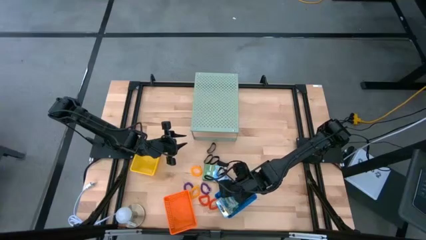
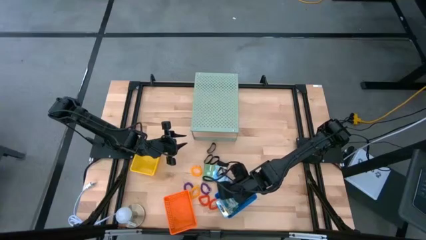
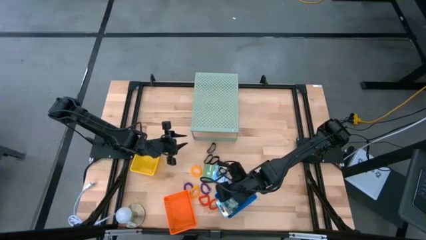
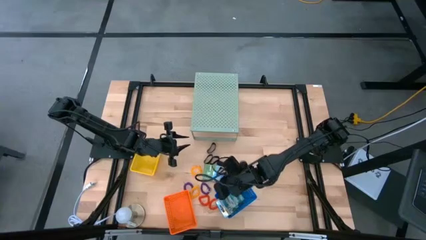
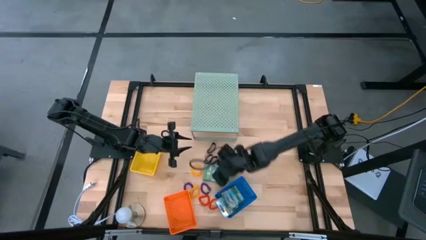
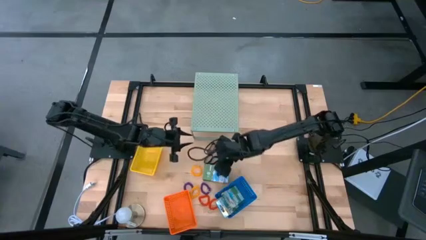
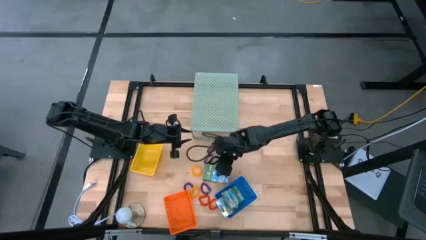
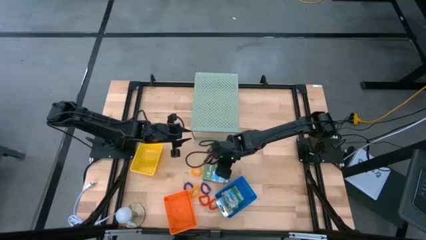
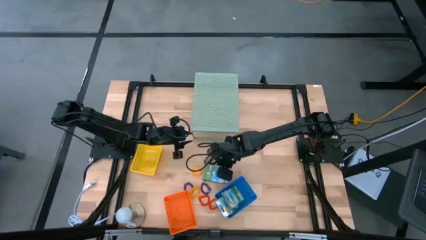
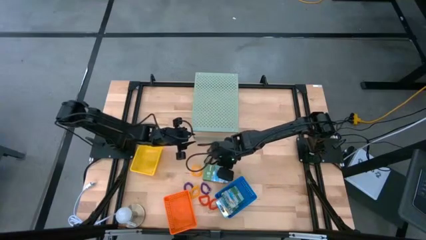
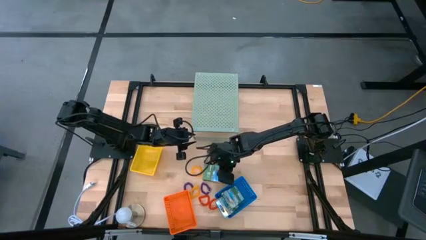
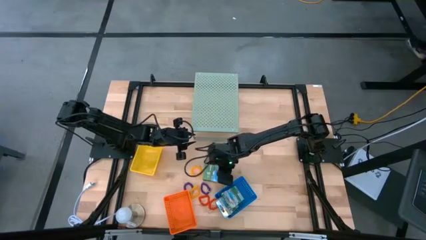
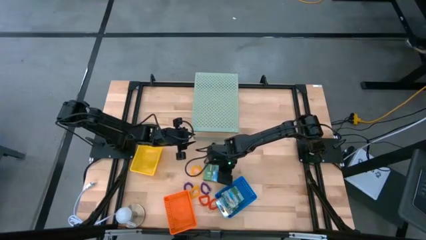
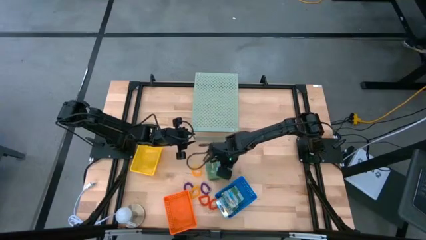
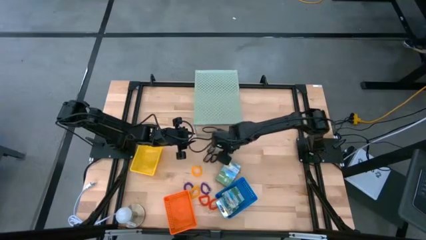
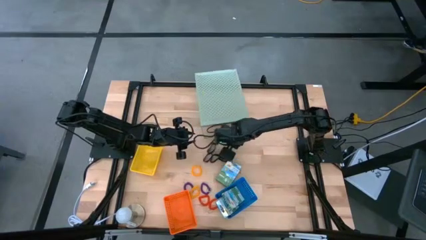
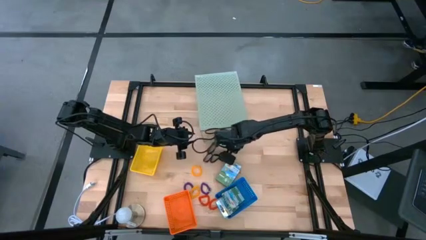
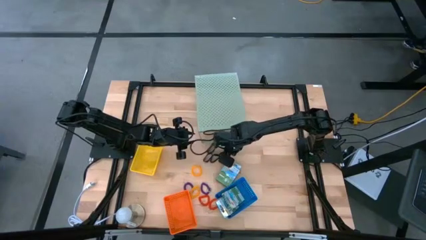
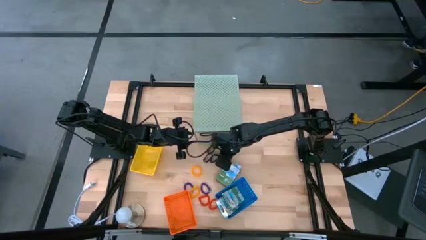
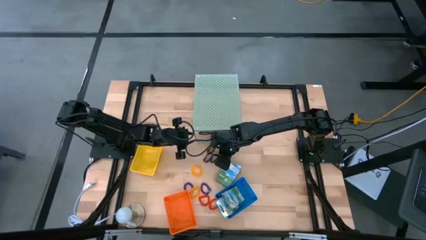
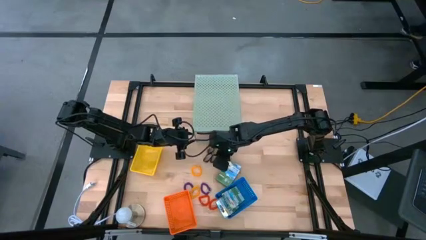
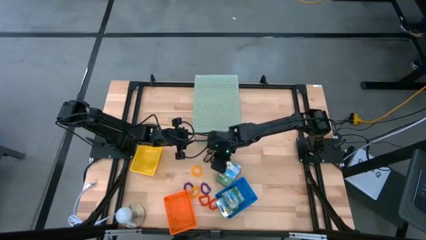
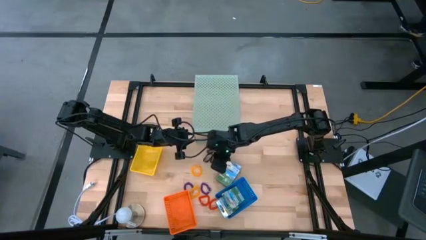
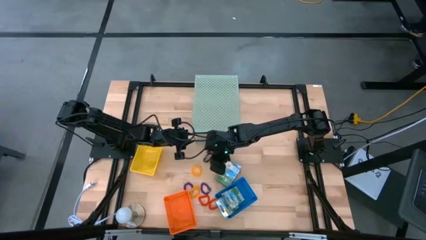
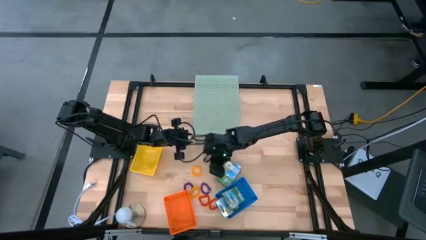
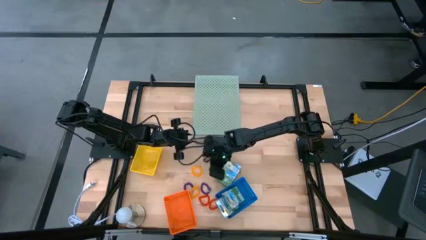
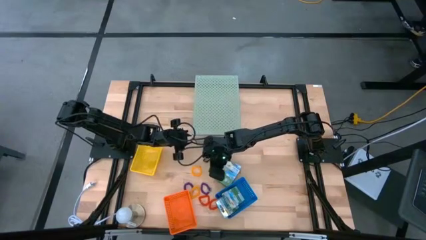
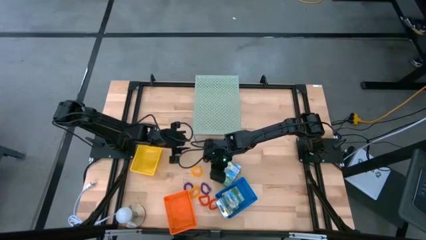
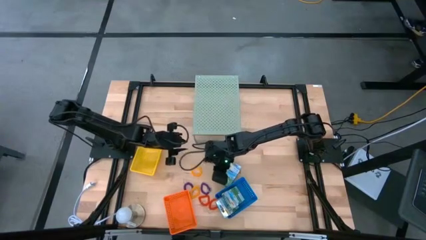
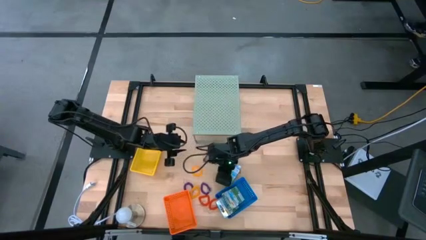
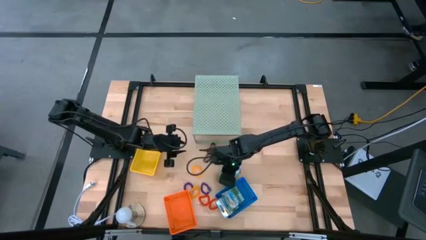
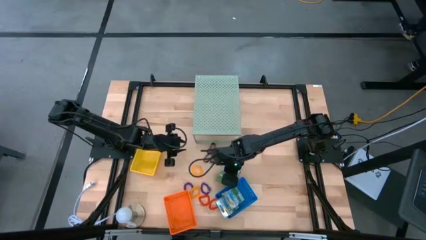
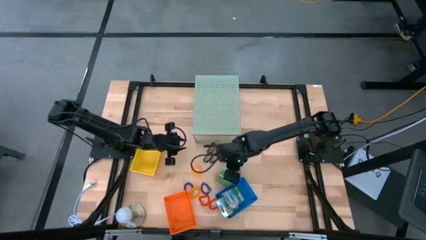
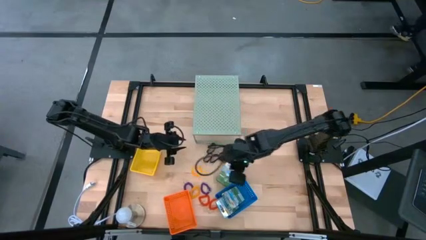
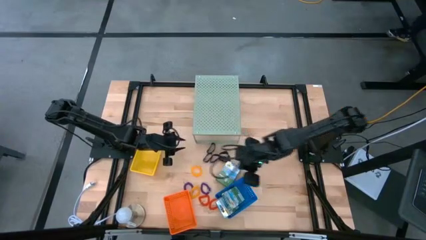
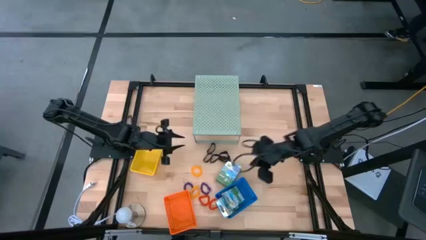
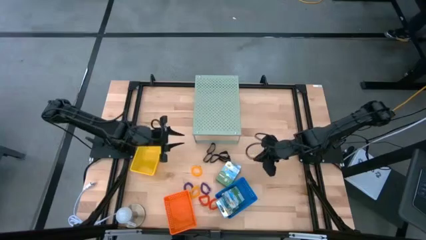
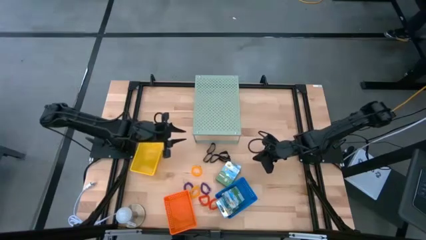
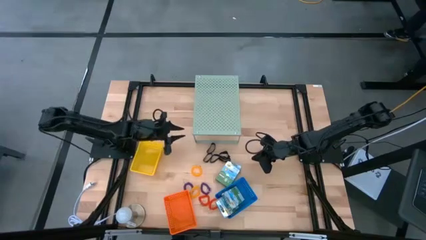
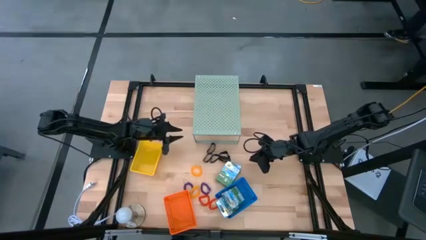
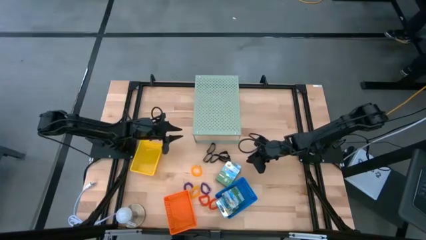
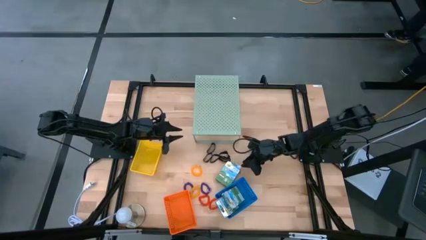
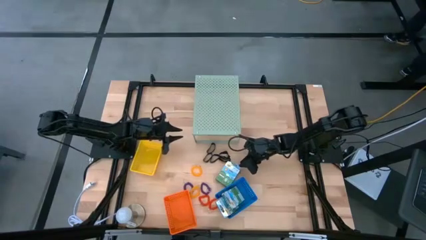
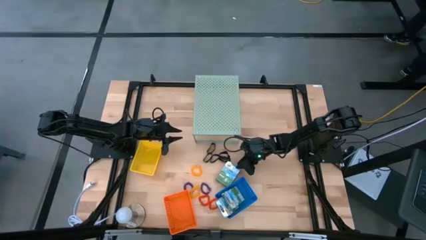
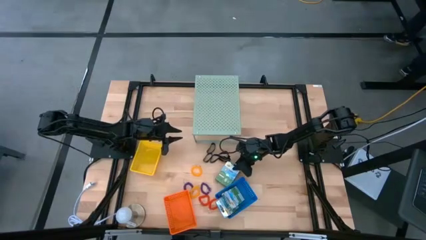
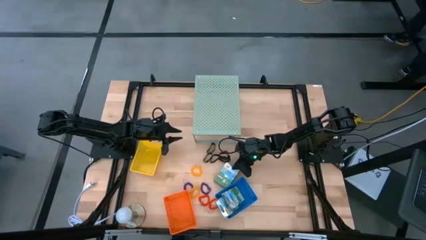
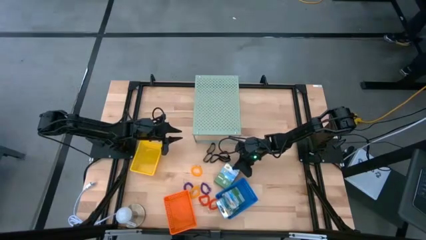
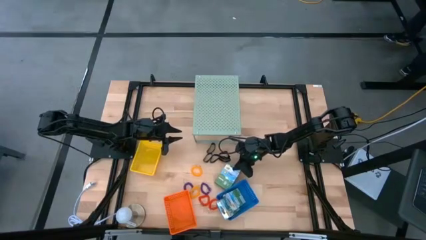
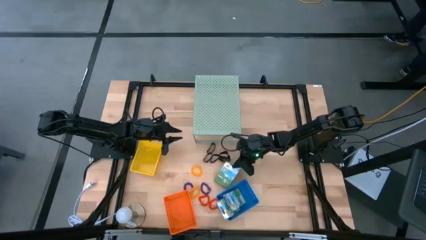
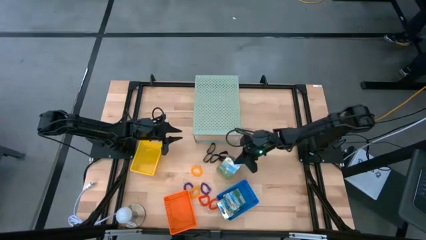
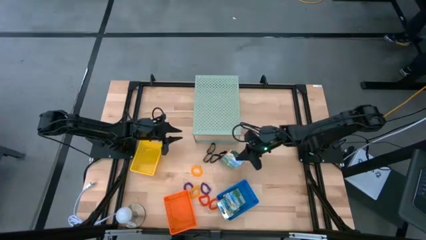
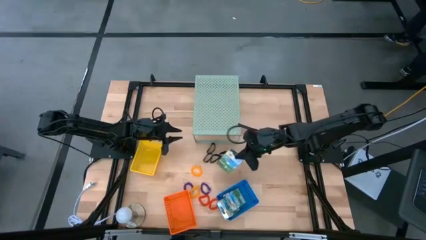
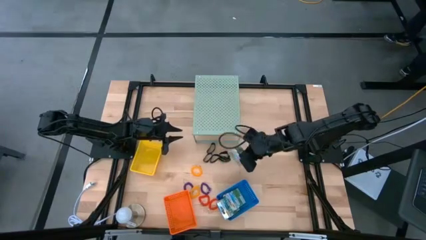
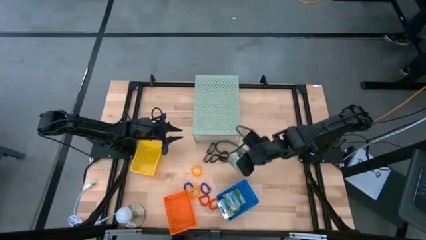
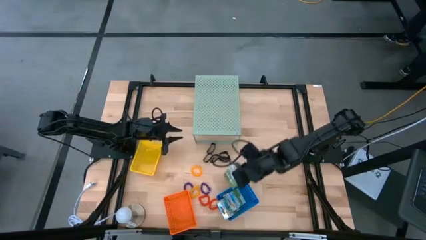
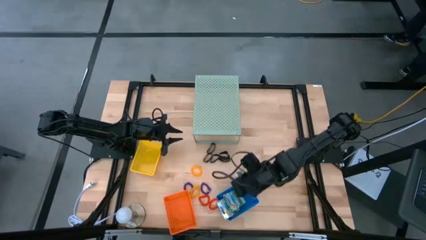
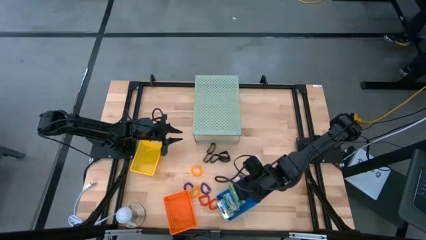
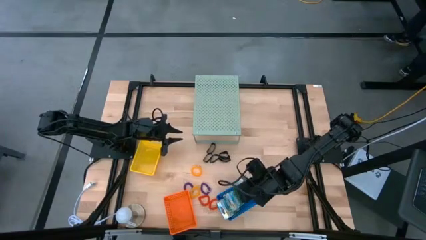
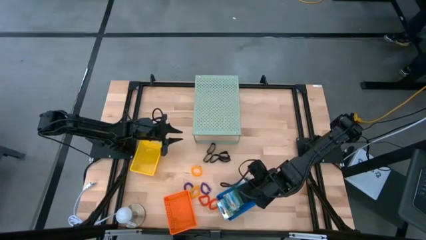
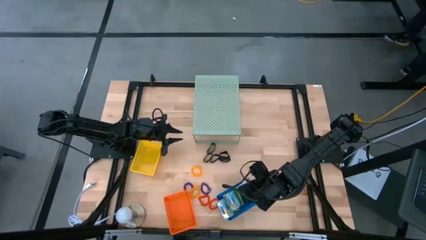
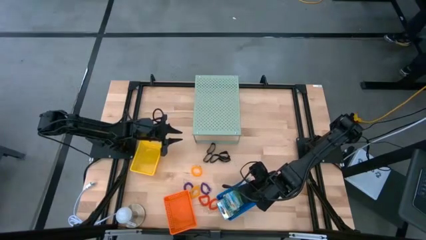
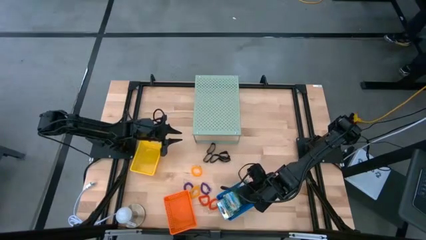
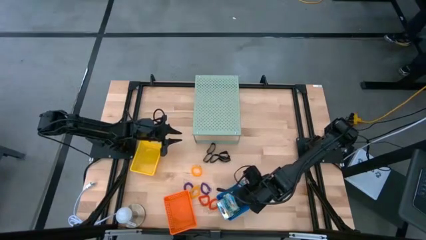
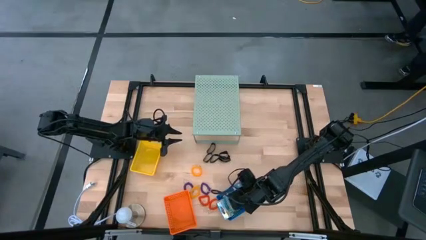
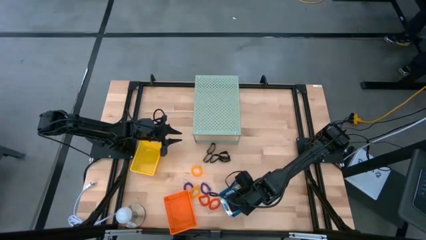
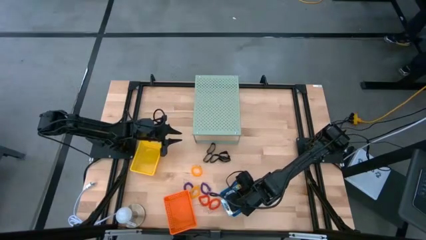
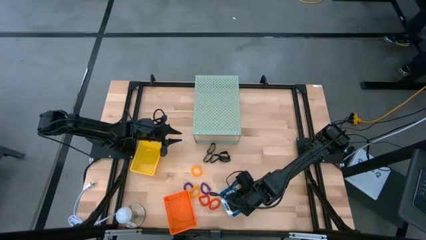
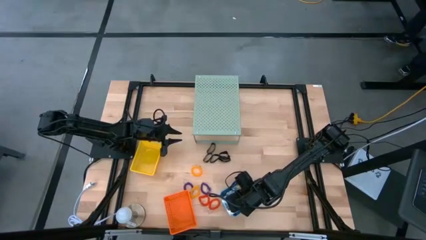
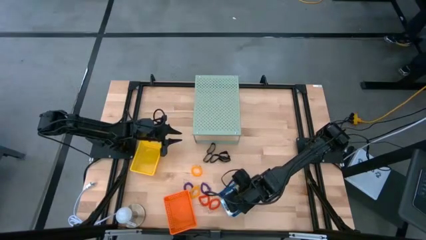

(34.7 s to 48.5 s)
Task: Pick & Place Office Desk Supplies
Put the crayon box into the blue bin

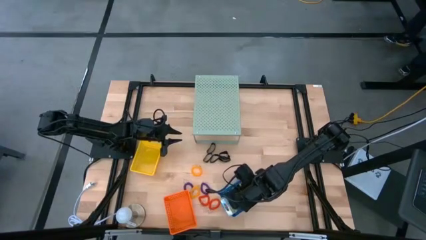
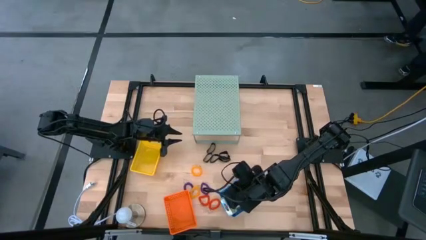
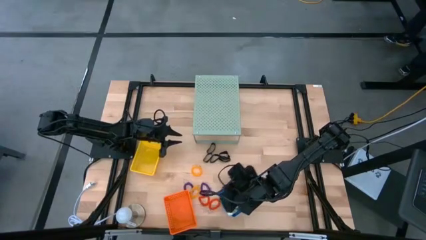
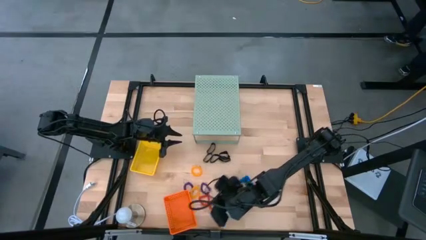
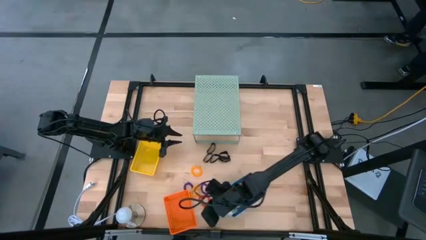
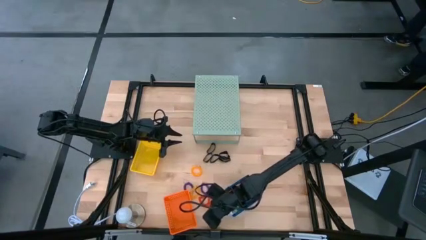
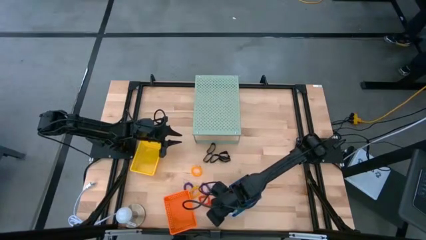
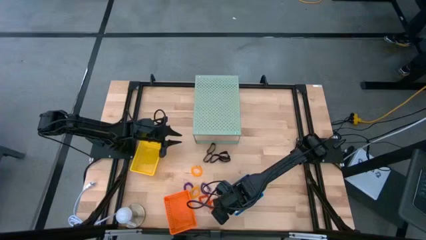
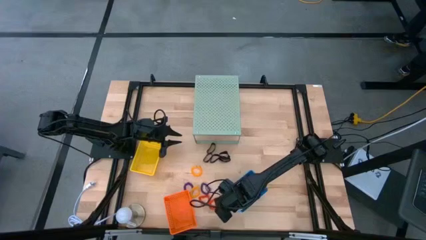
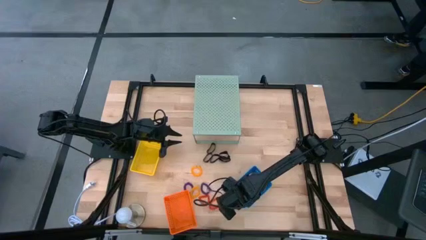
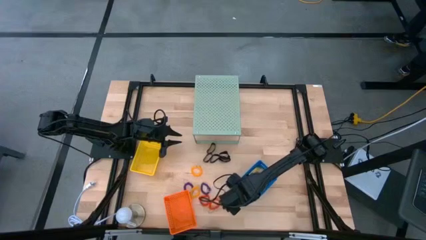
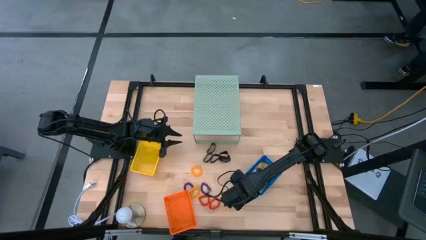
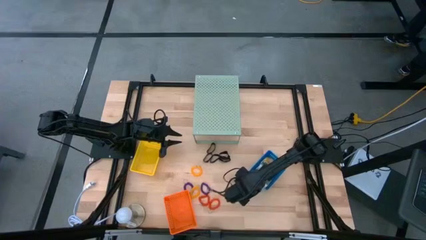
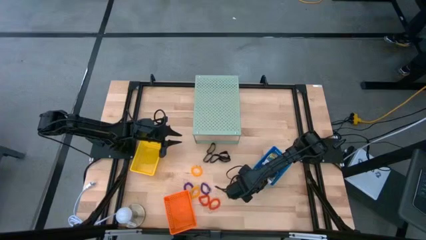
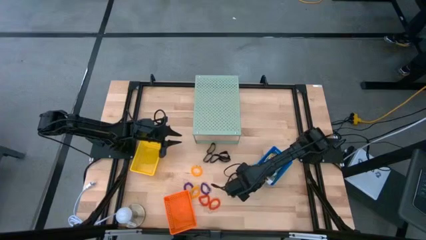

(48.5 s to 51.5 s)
Adjust the blue bin
